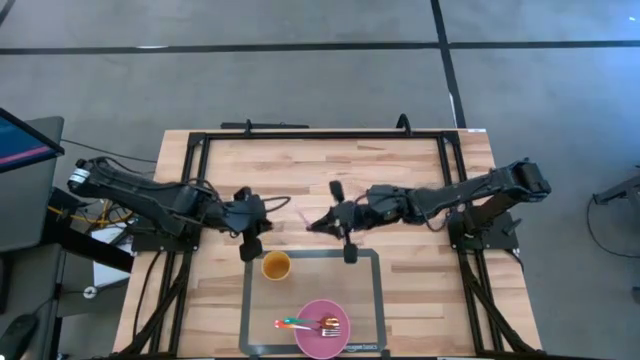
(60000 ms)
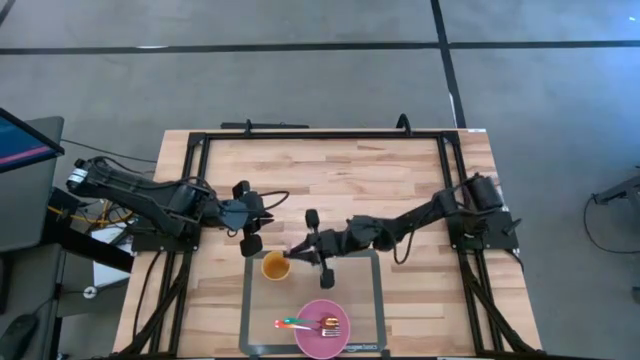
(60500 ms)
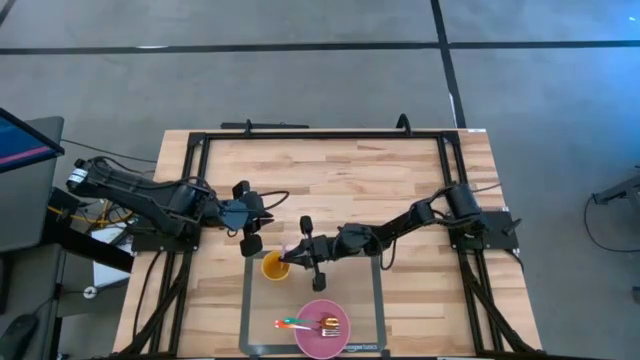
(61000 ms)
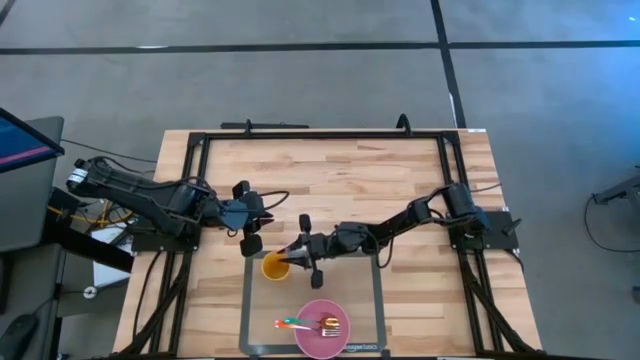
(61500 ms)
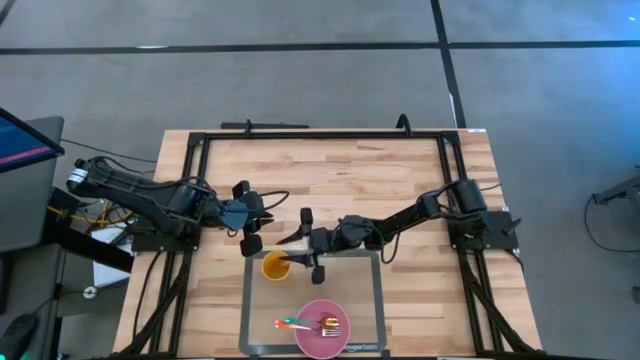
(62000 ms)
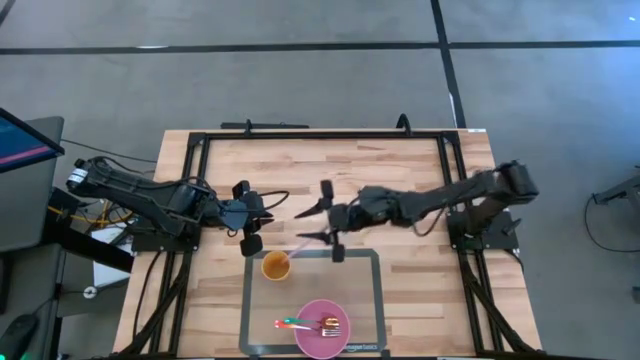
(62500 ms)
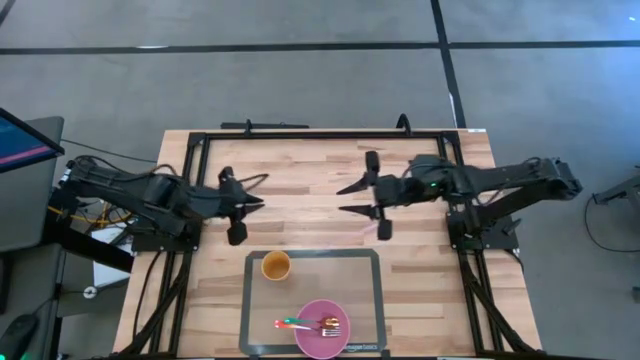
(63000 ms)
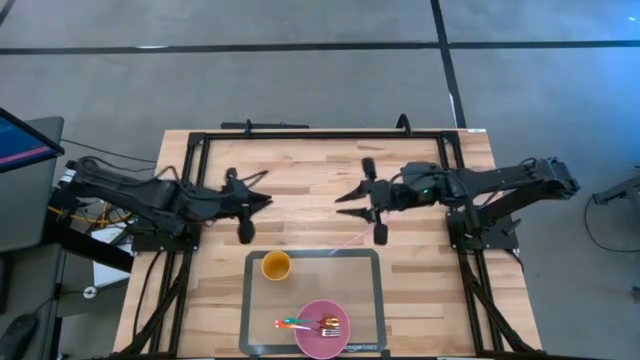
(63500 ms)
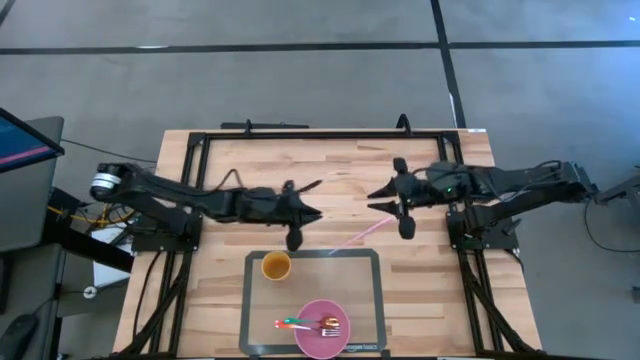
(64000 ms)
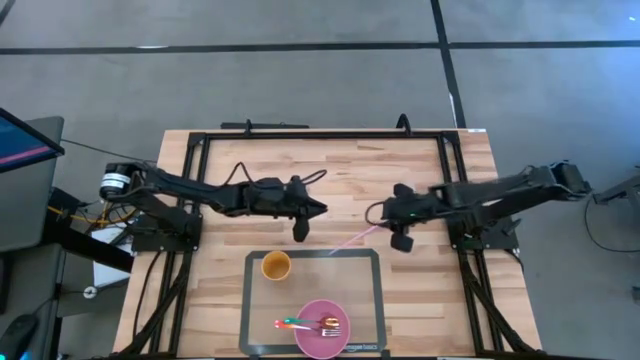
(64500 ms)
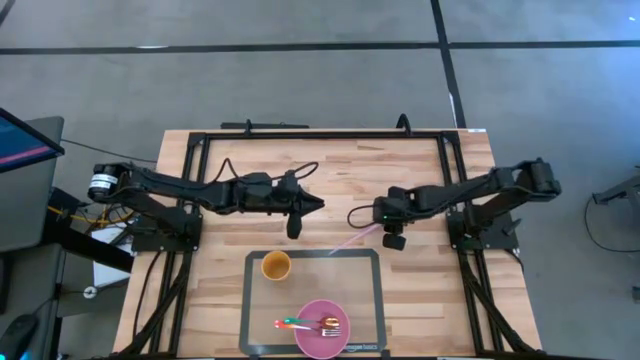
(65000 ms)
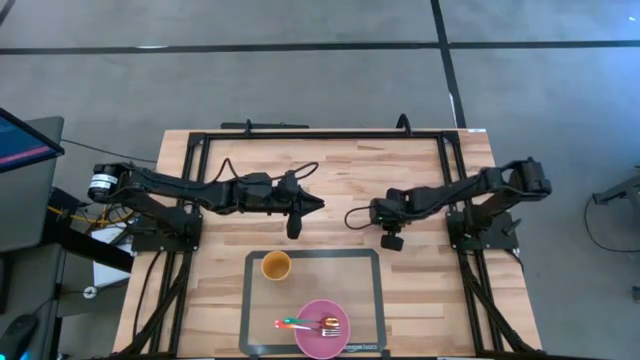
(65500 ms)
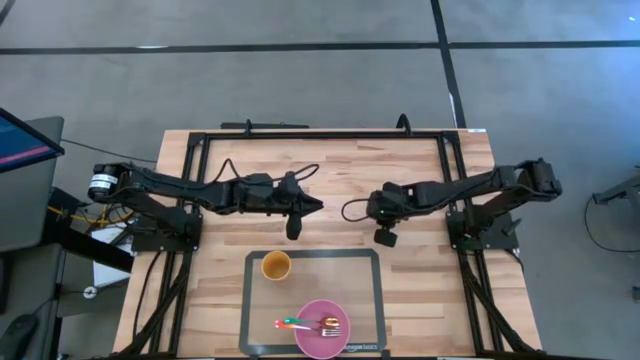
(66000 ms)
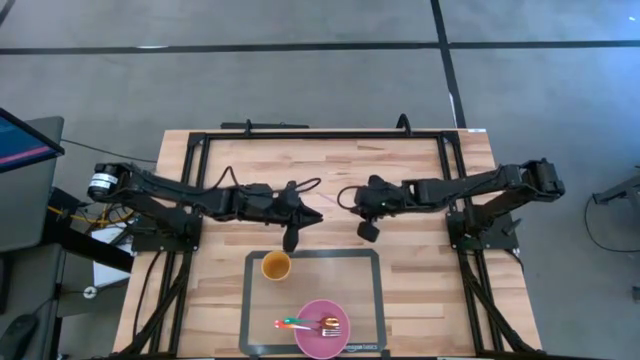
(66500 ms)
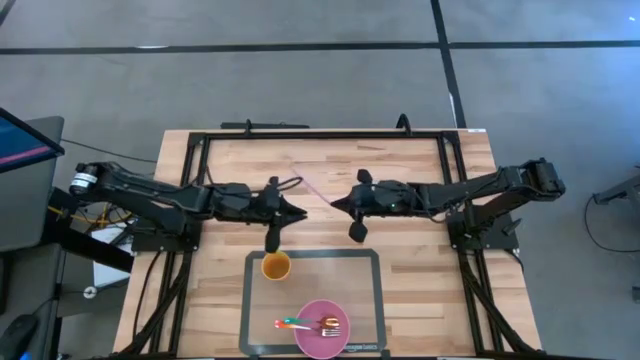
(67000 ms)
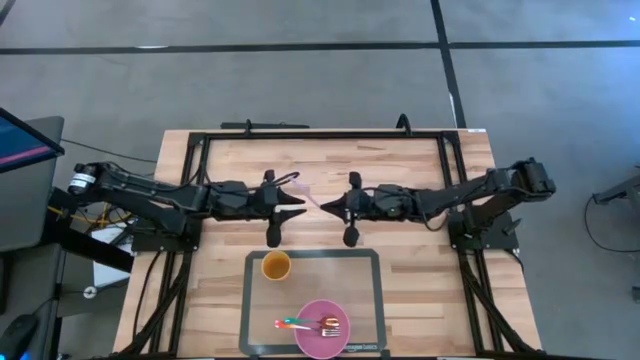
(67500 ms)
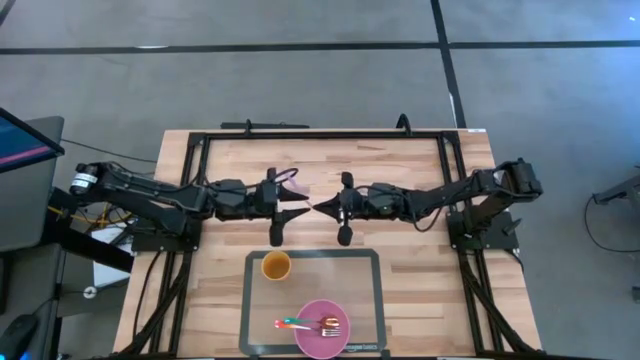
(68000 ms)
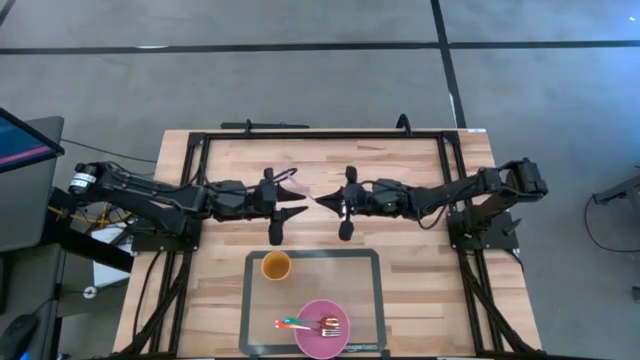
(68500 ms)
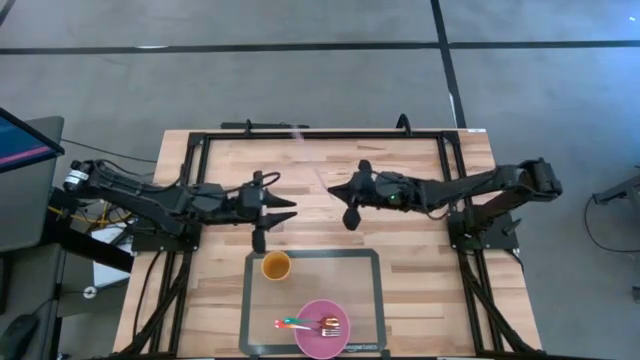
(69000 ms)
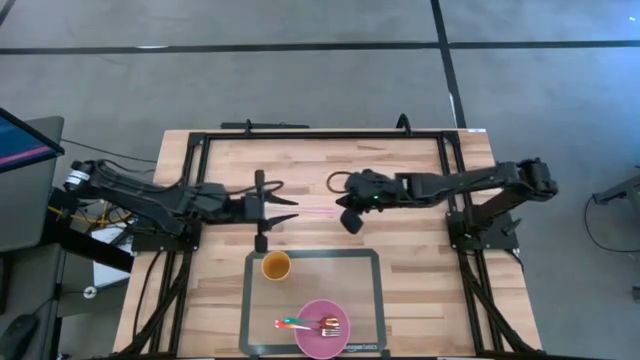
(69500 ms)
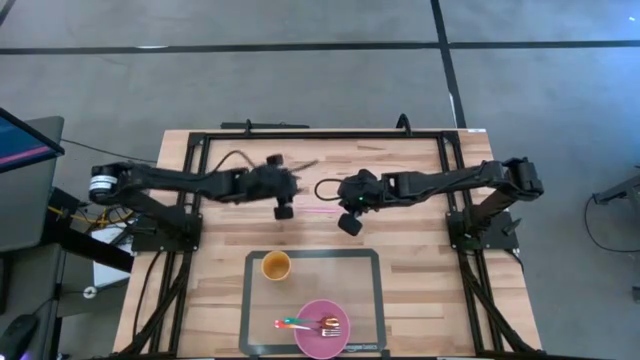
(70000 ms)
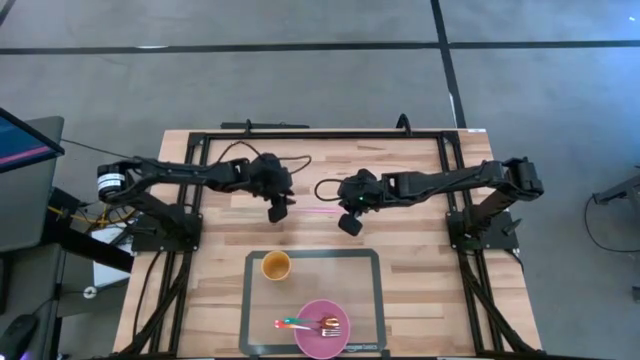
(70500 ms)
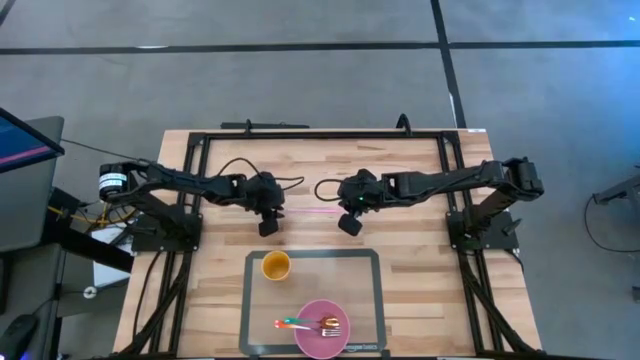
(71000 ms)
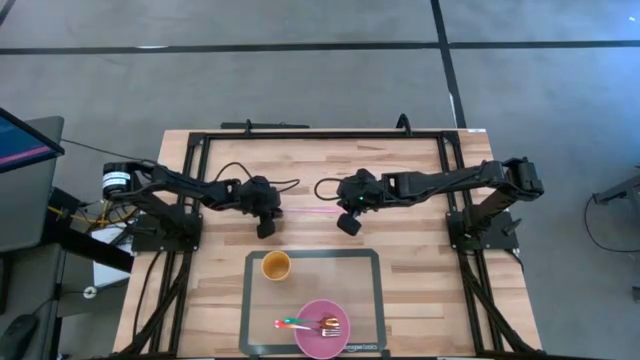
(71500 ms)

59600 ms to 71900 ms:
Task: Pick & Place Utensil
Put the pink straw into the yellow cup on the transparent mat

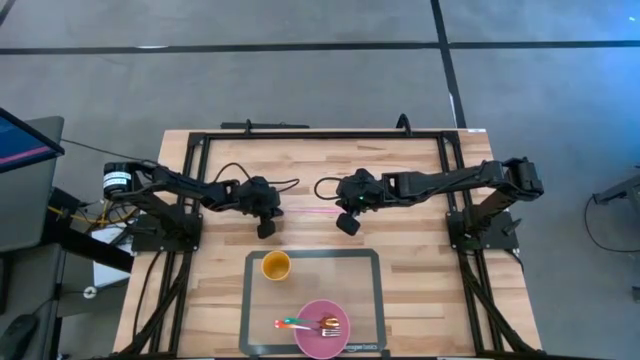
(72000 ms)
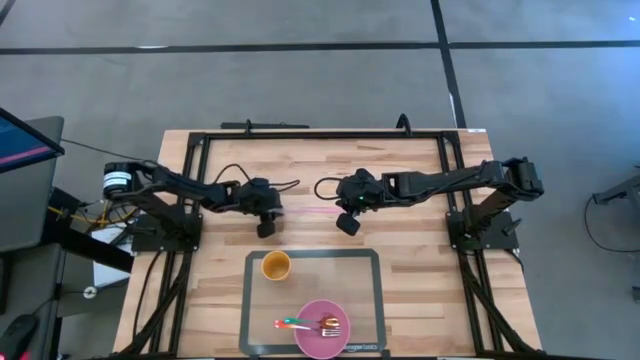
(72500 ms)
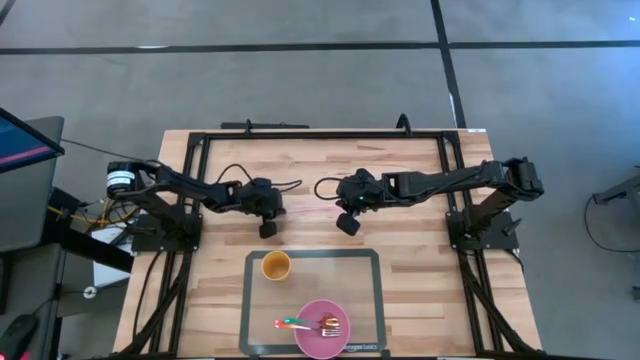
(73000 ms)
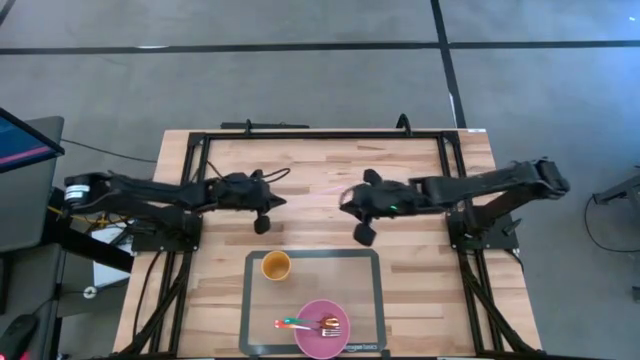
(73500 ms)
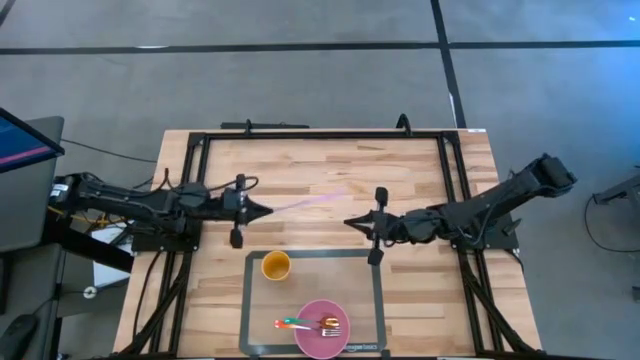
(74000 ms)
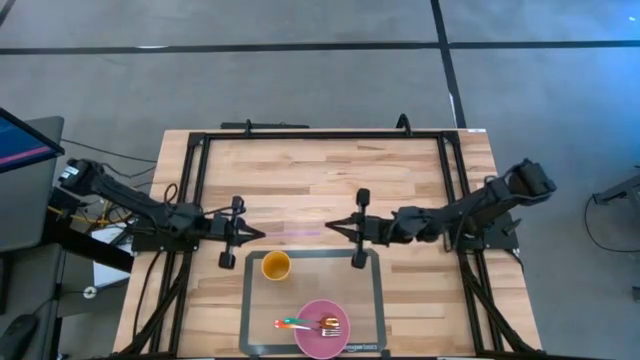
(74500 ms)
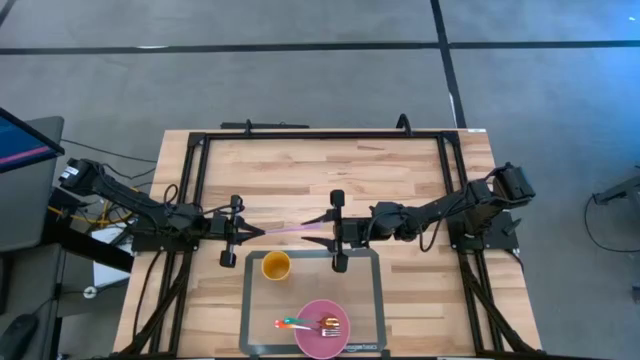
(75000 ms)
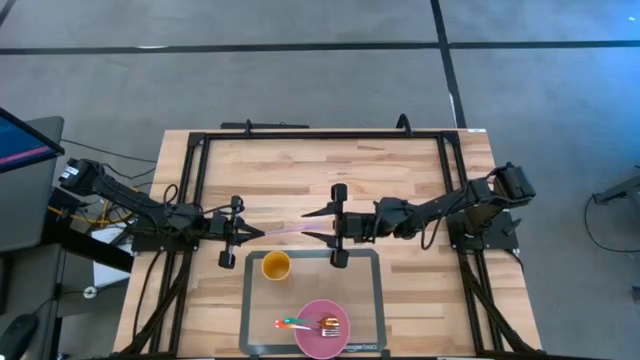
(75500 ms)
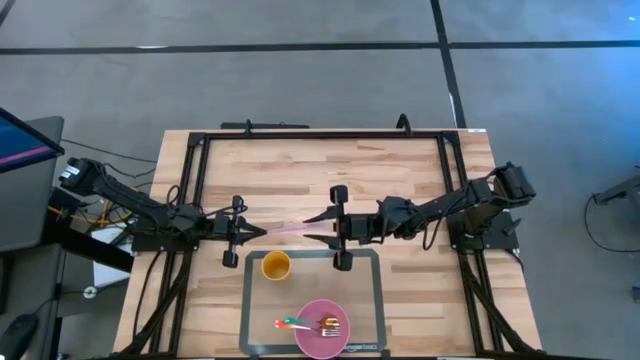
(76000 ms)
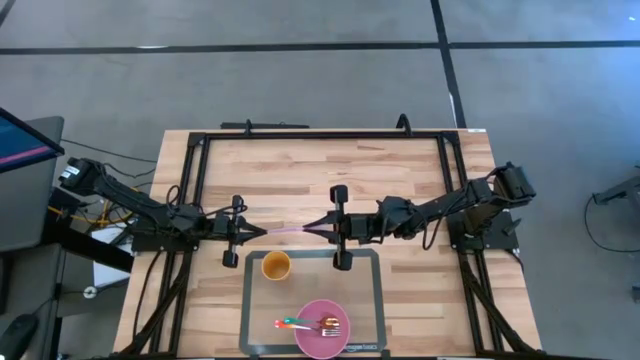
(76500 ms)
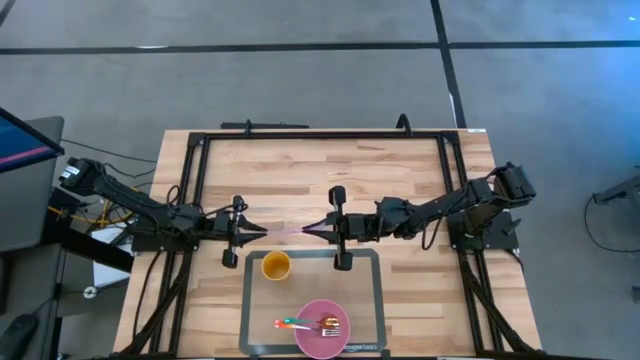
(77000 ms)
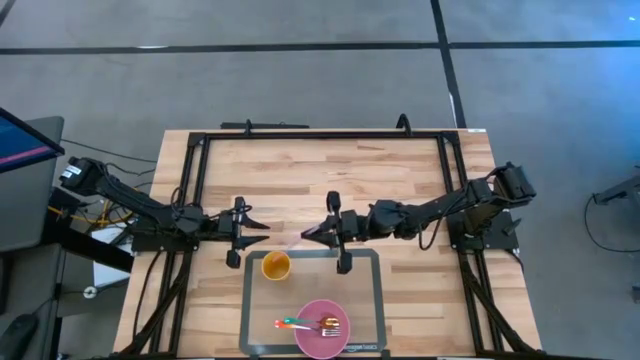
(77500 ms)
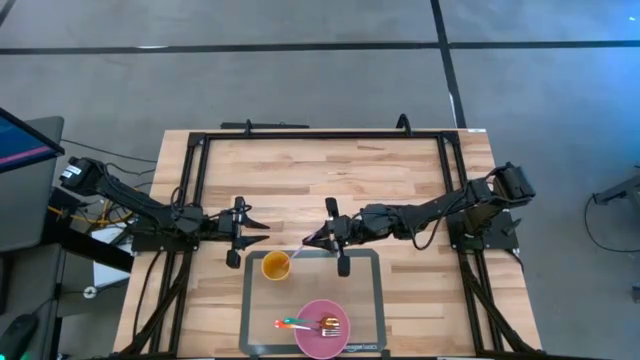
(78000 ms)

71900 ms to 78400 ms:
Put the pink straw into the yellow cup on the transparent mat

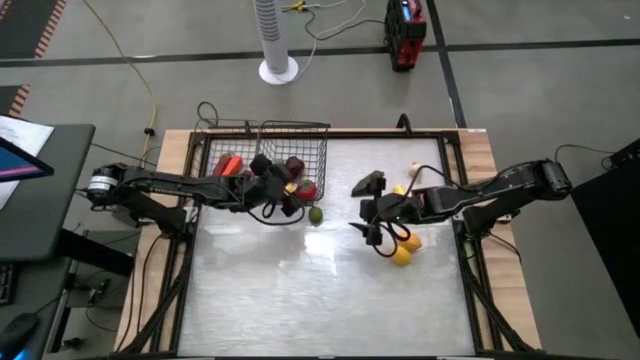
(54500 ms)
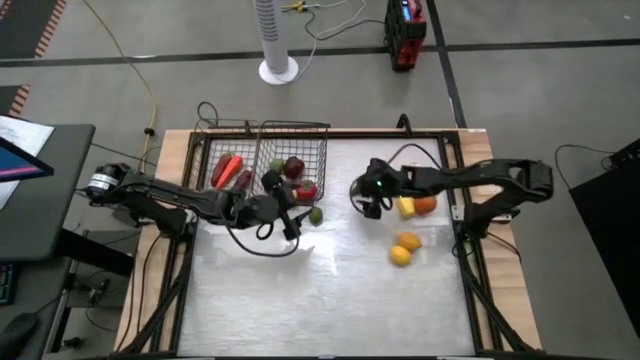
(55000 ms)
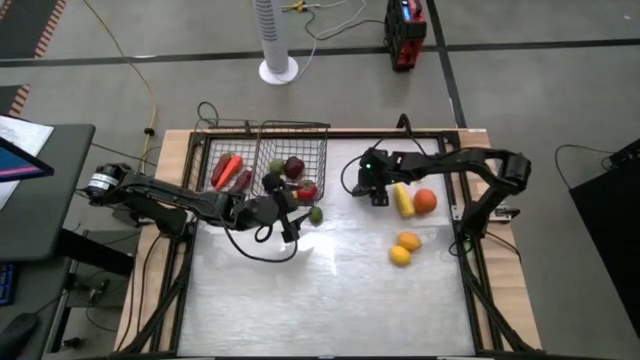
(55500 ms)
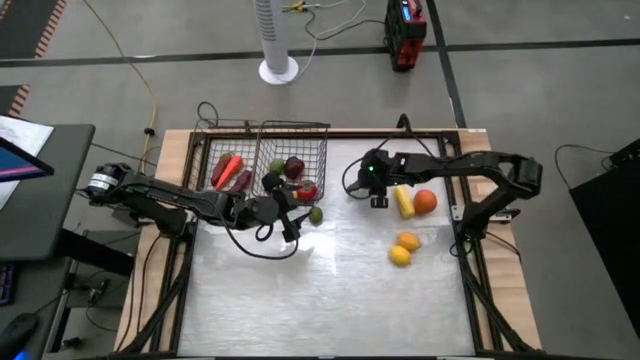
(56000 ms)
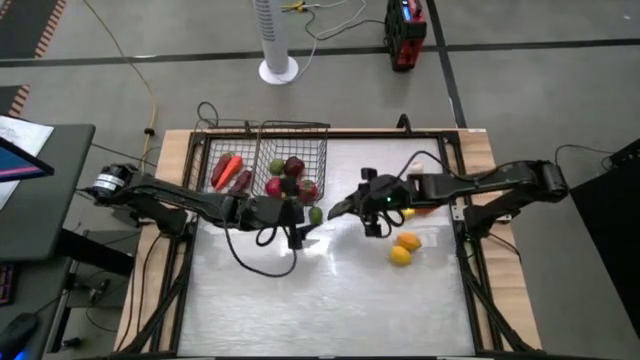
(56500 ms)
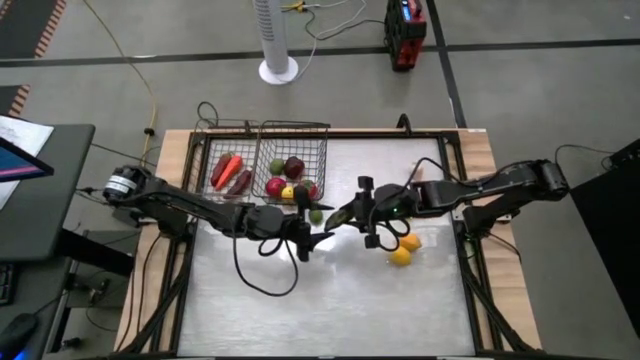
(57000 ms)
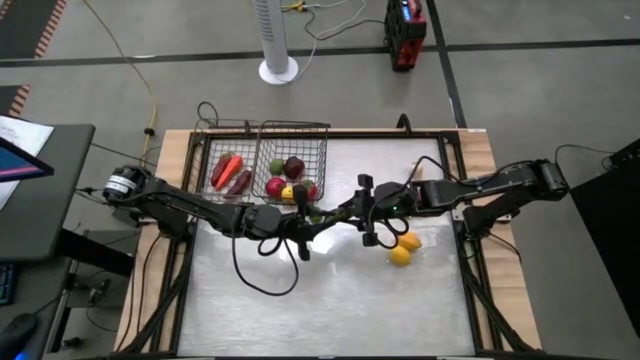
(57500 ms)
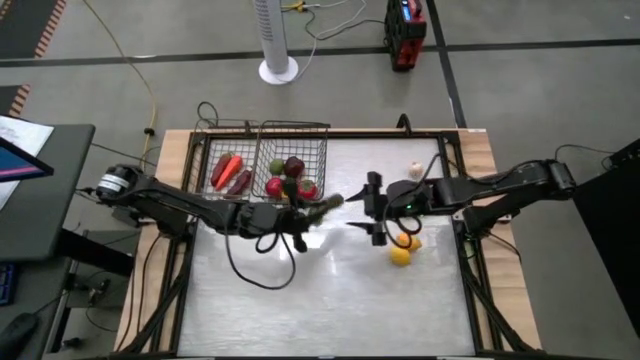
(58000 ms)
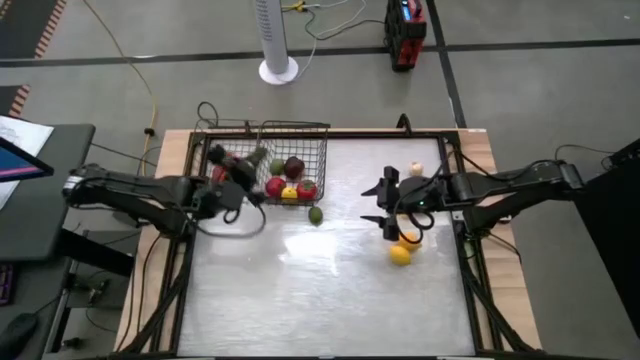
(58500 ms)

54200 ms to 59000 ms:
Task: Sort produce into baskets
Put the green chili pepper into the left wire basket
